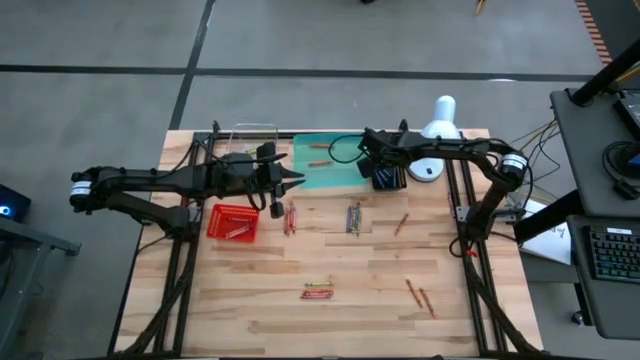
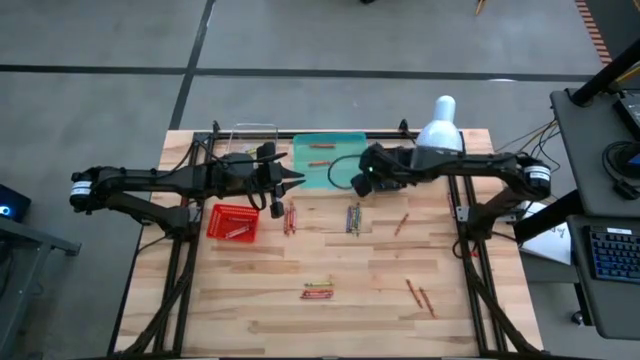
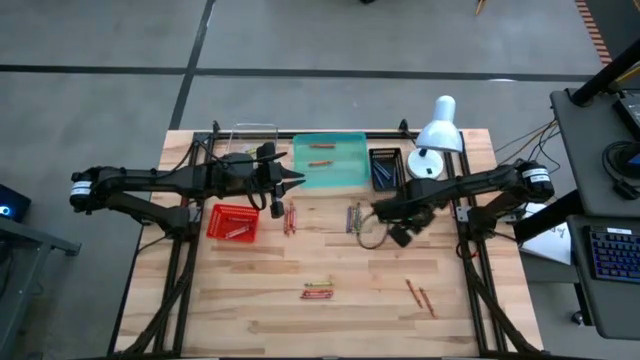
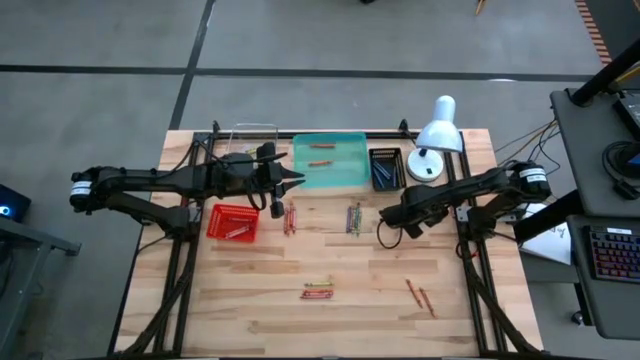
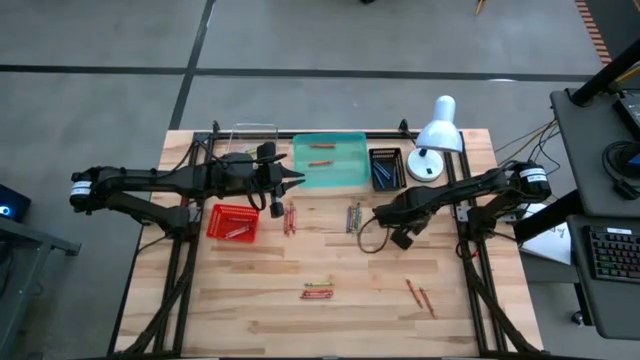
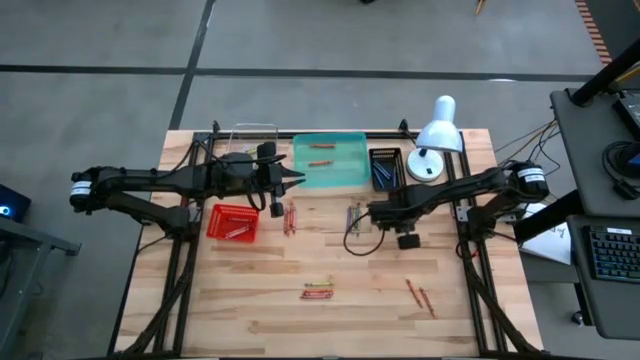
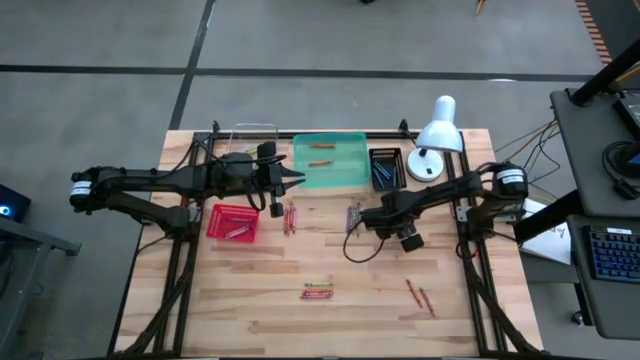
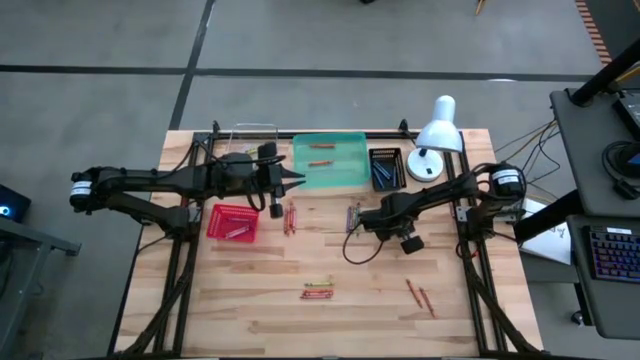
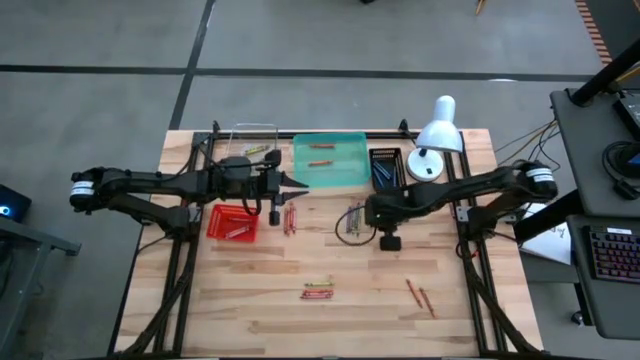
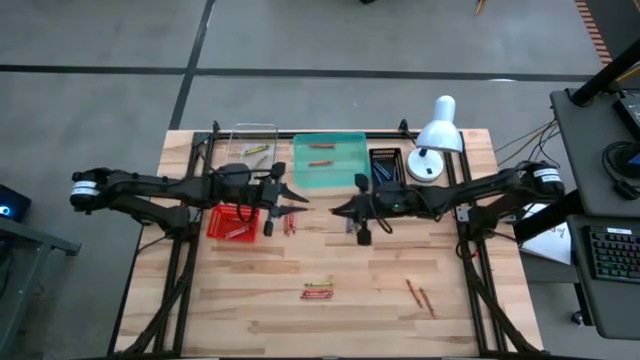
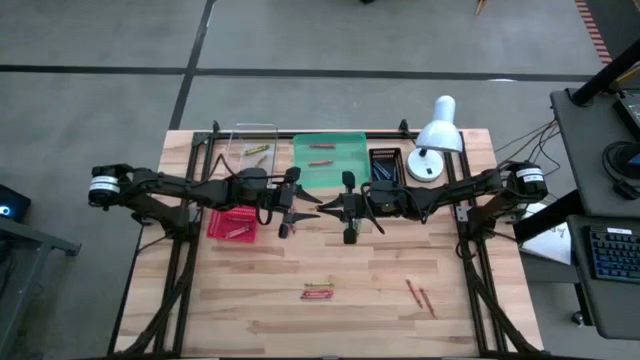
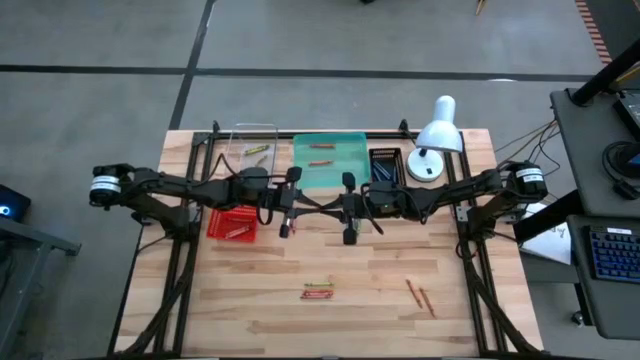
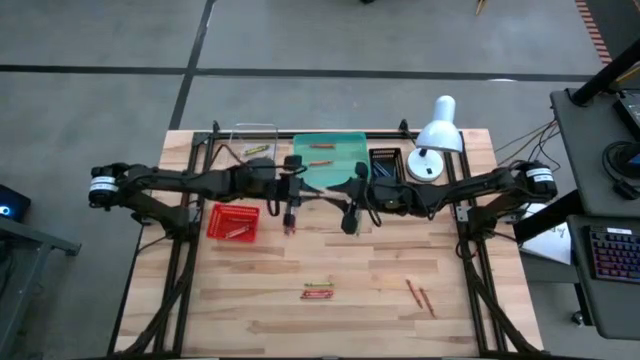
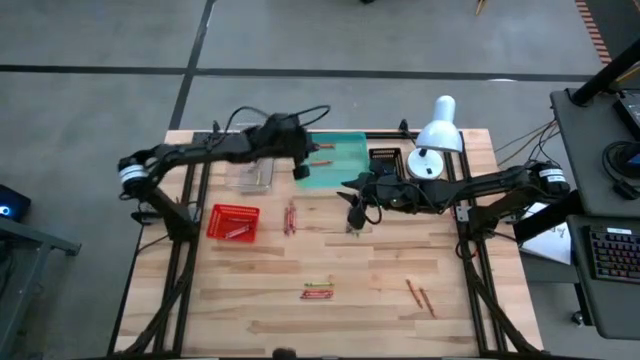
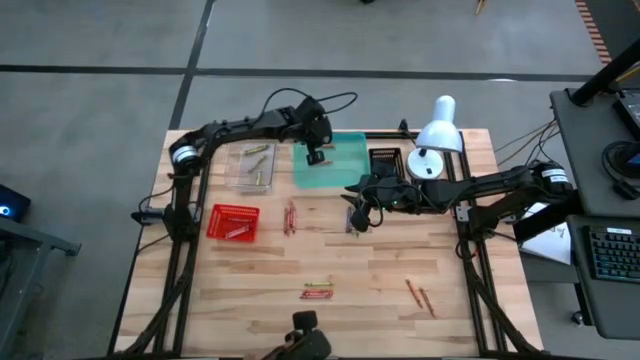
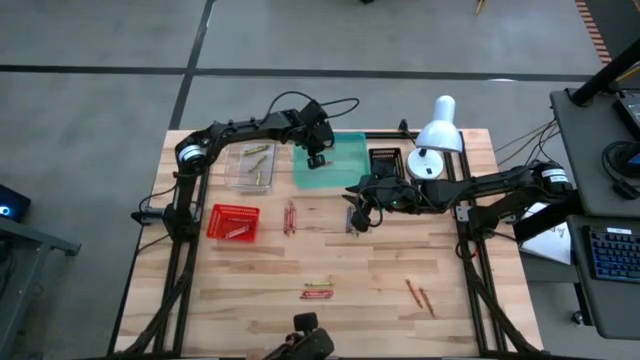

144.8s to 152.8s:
Task: Sort crayons
Put the orange crayon into the green bin

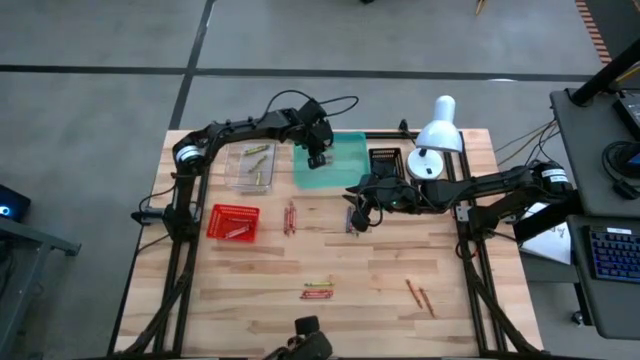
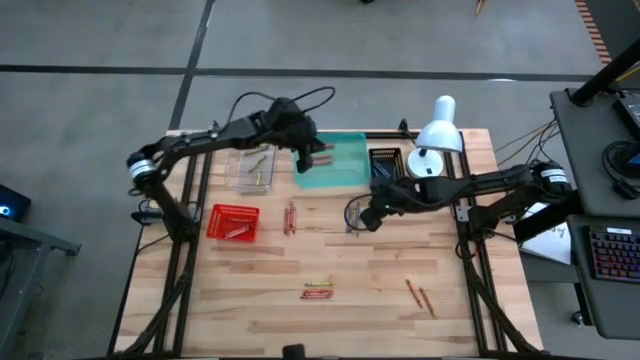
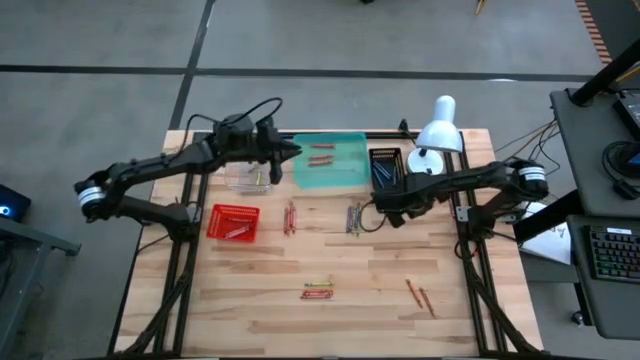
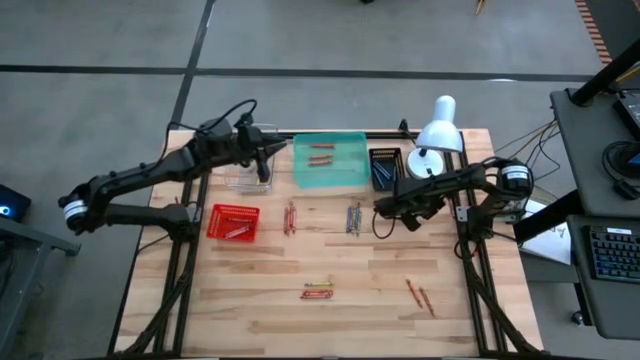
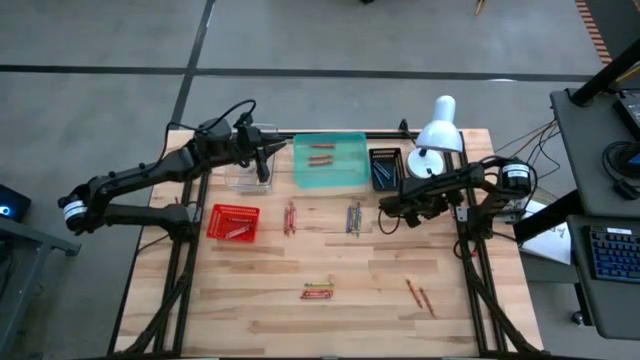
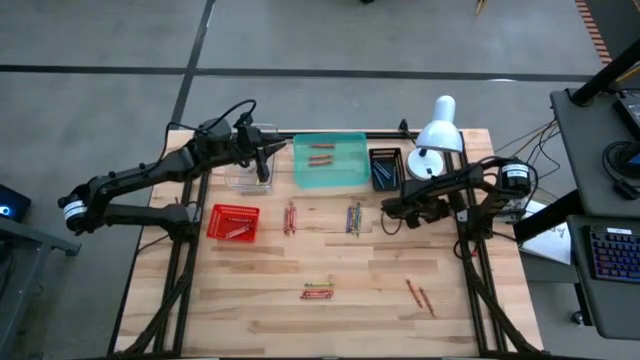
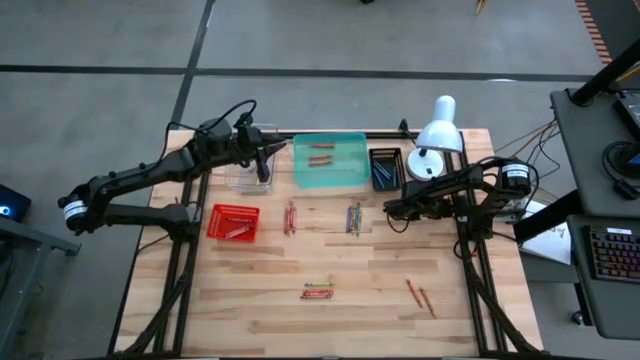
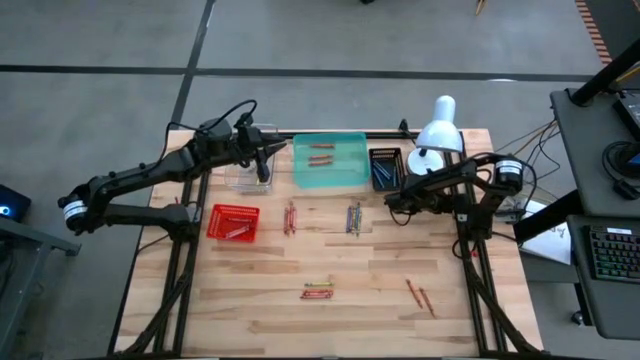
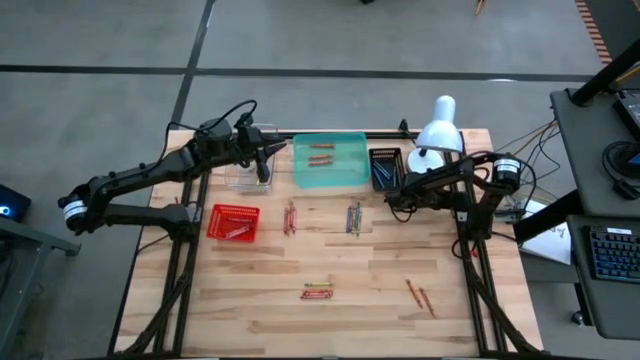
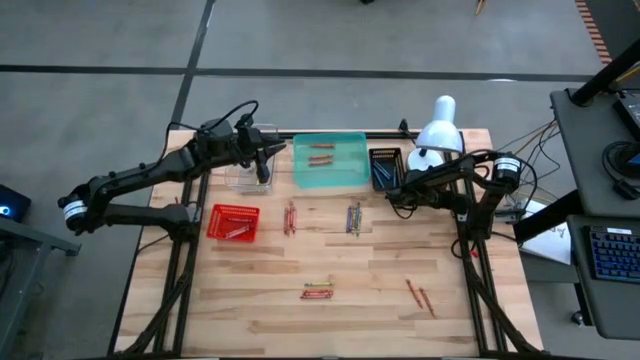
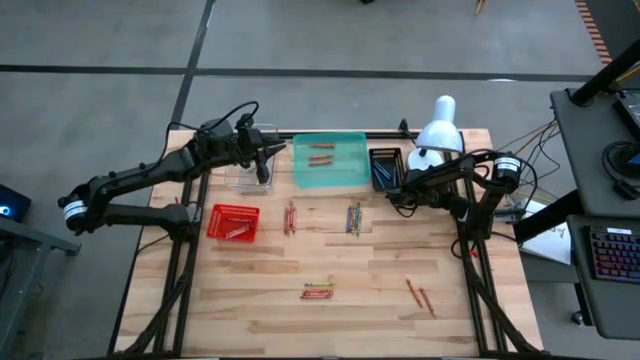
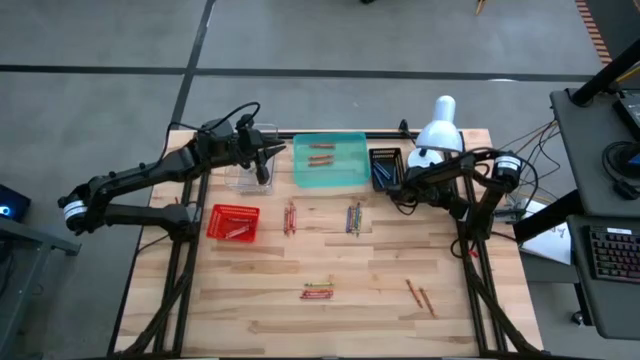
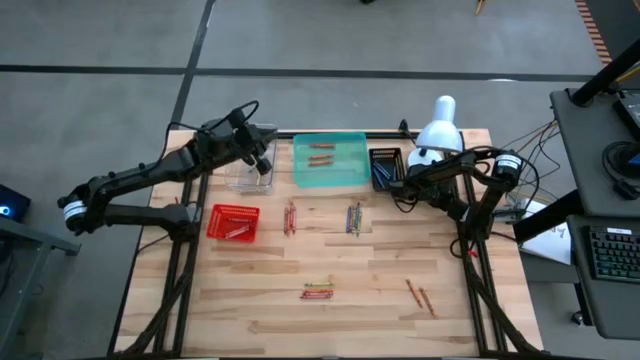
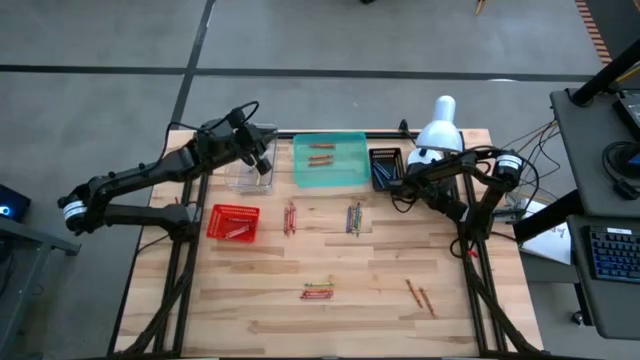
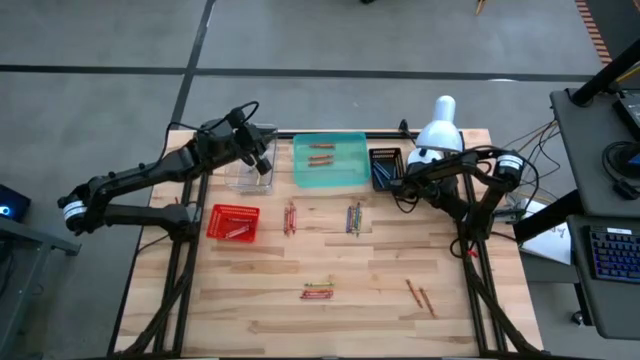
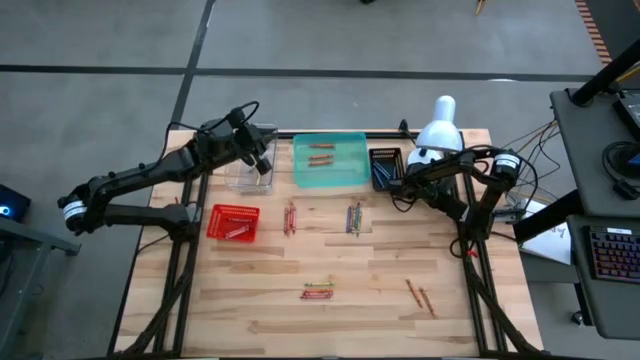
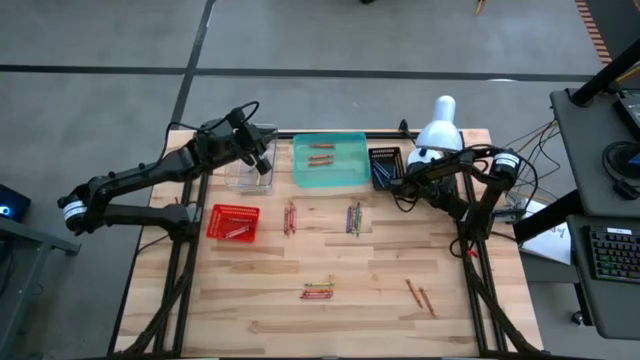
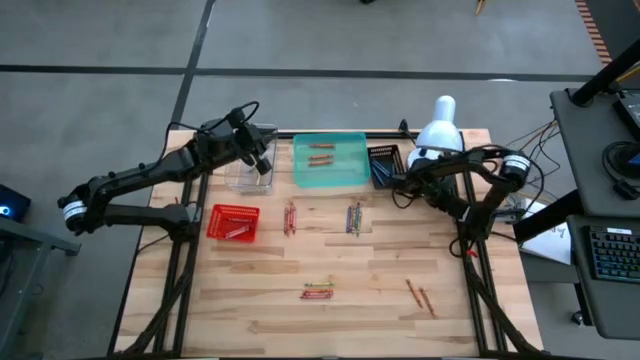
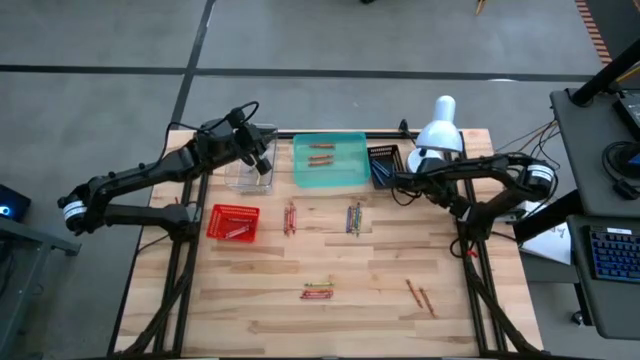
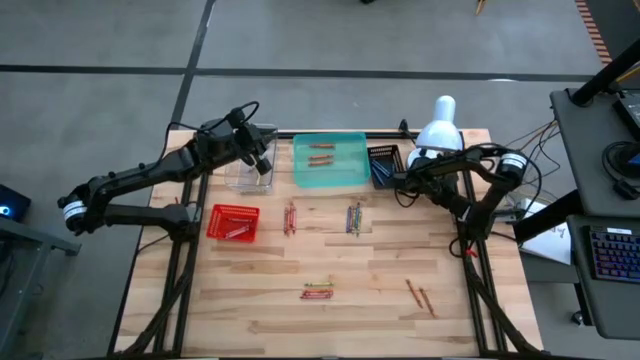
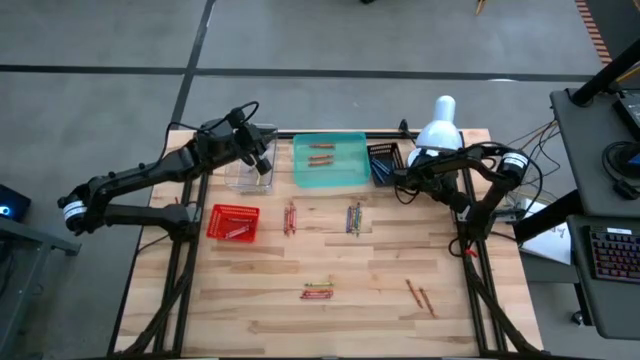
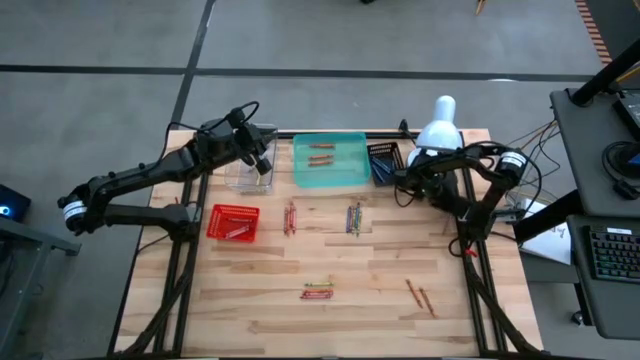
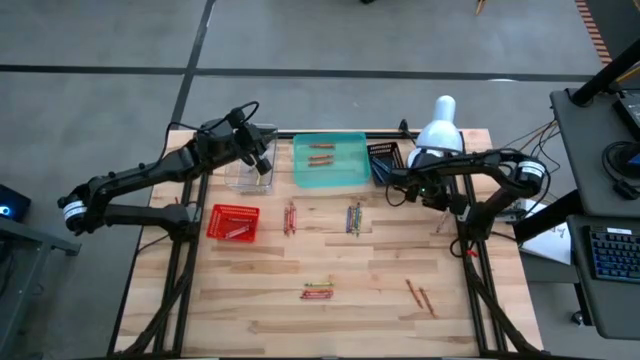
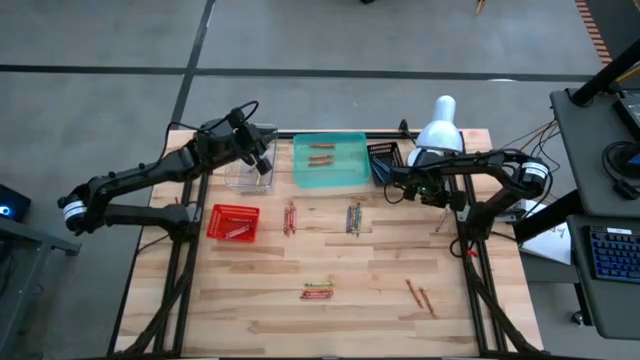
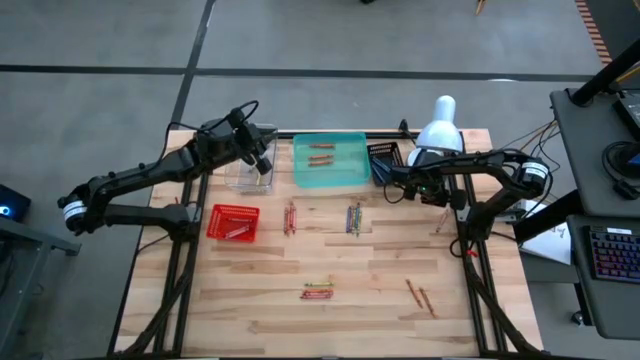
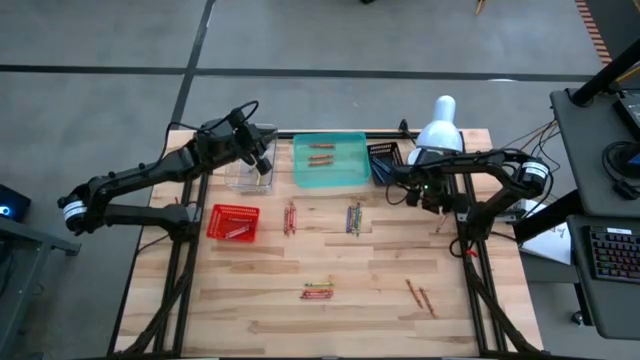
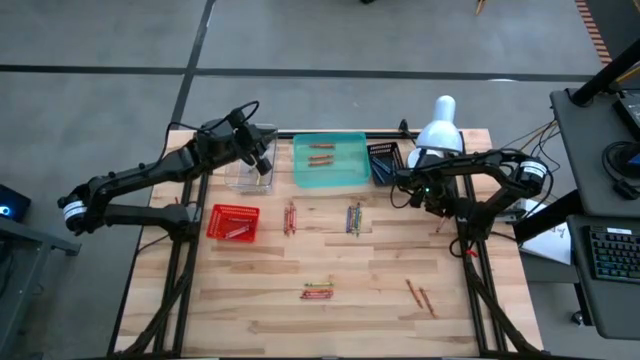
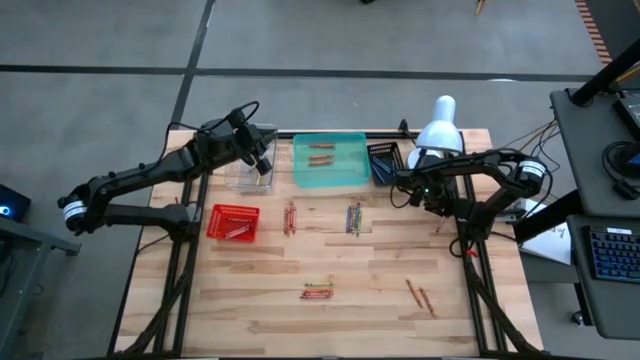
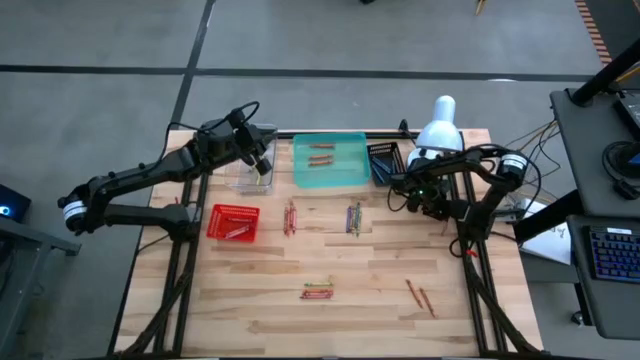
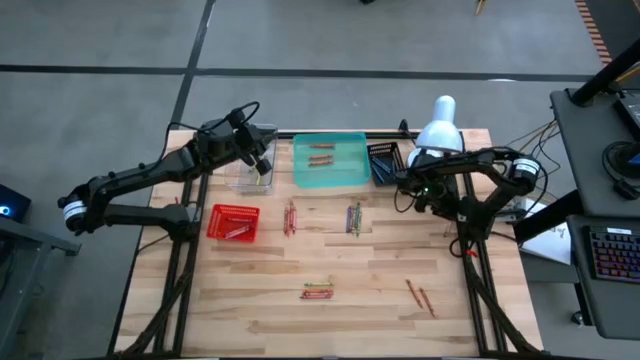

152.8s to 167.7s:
Put the red crayon into the red bin
